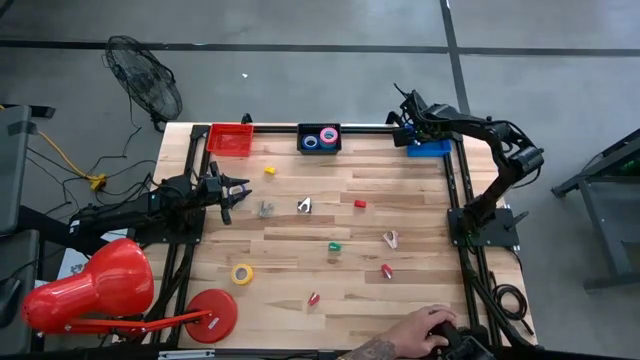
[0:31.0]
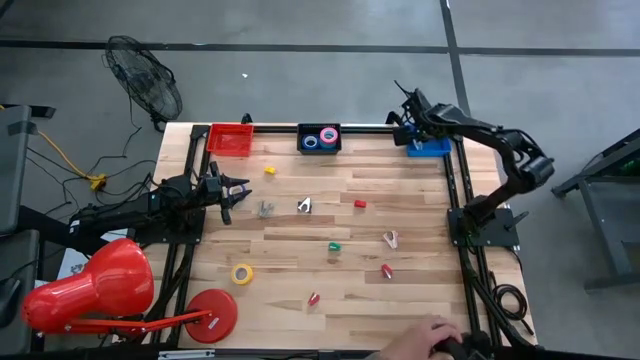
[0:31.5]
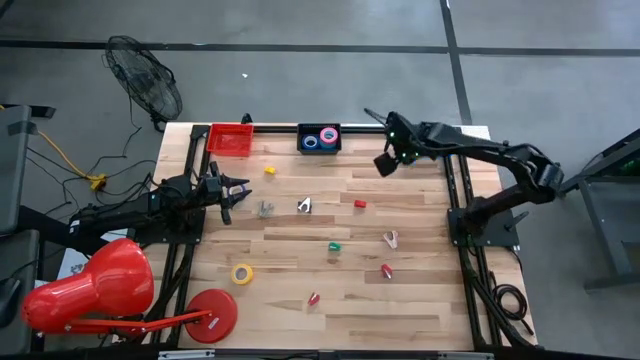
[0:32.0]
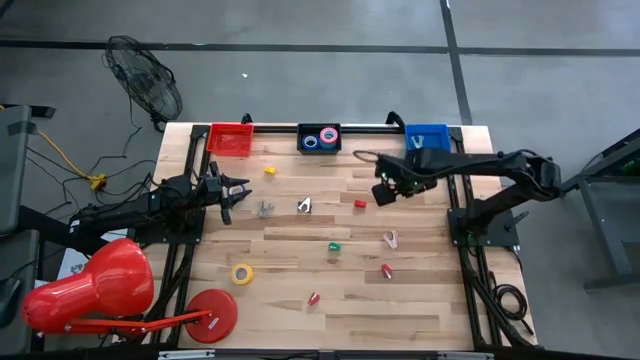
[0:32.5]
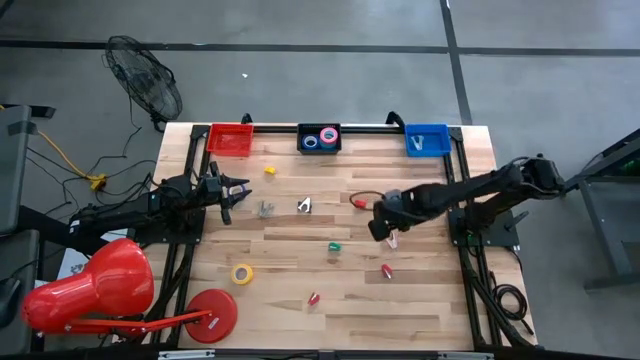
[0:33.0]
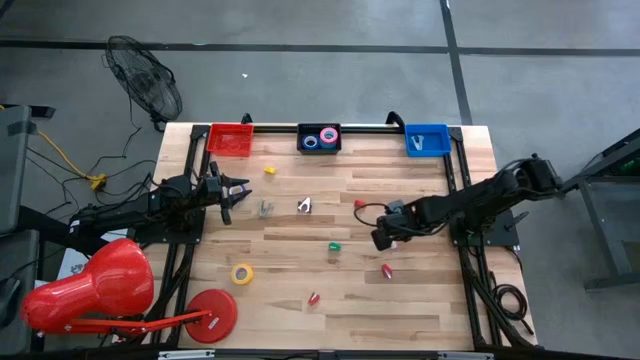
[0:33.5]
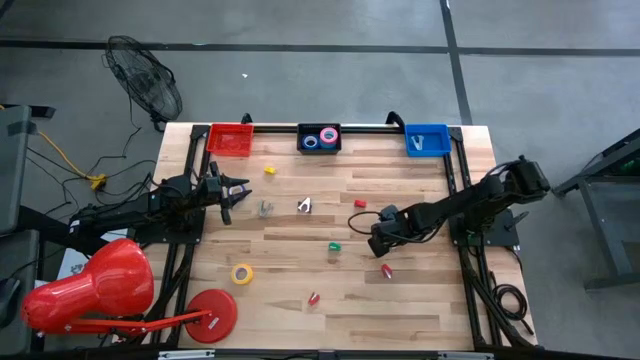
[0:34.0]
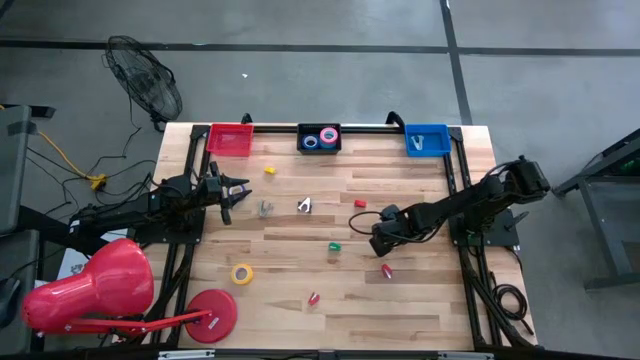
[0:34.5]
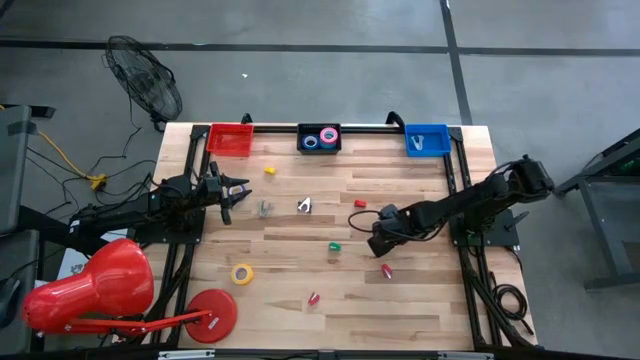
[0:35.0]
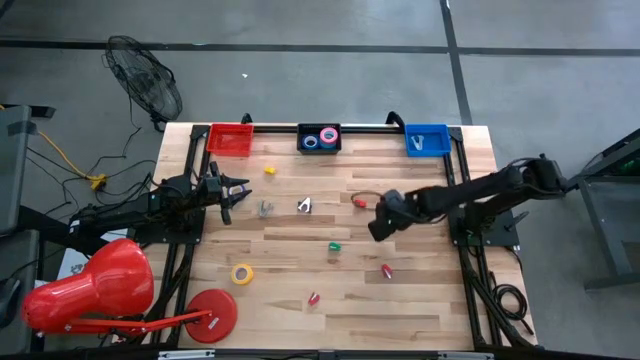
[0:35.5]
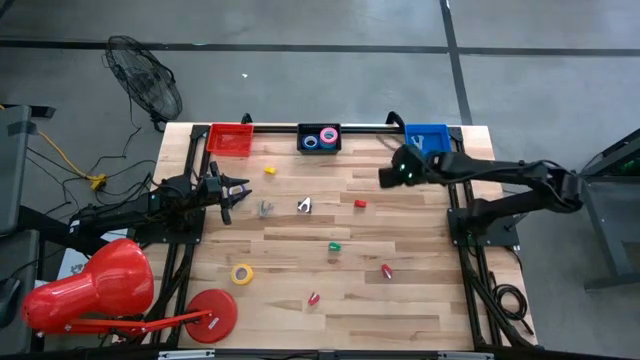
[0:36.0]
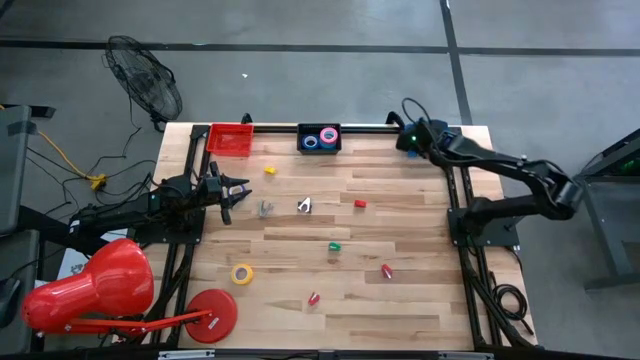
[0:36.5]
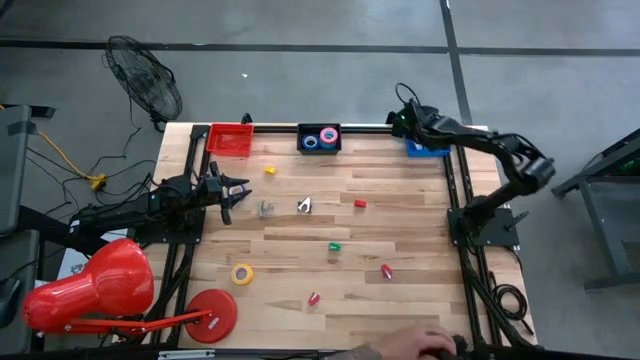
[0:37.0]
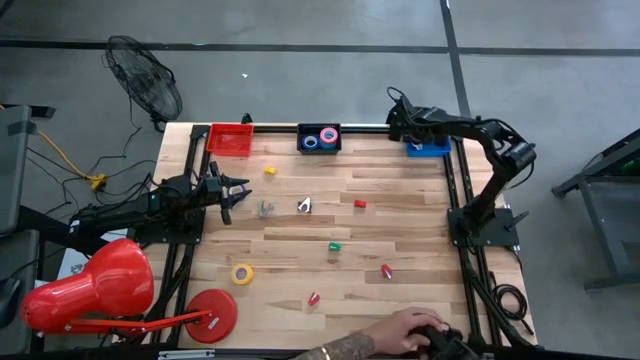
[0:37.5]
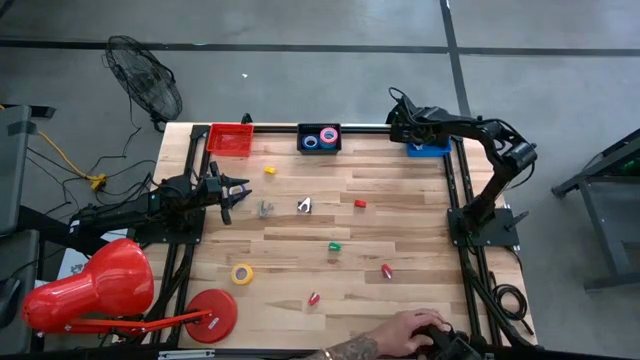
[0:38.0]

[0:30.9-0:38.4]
Task: Pick and place Stapler, Stapler remover, tape
Put the pink staple remover into the blue bin

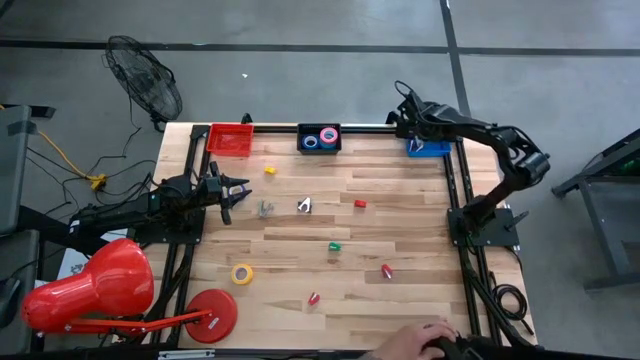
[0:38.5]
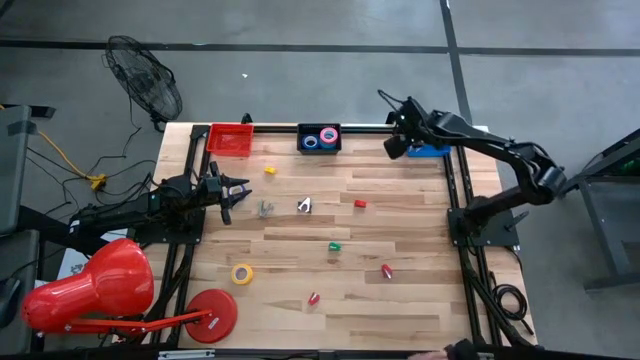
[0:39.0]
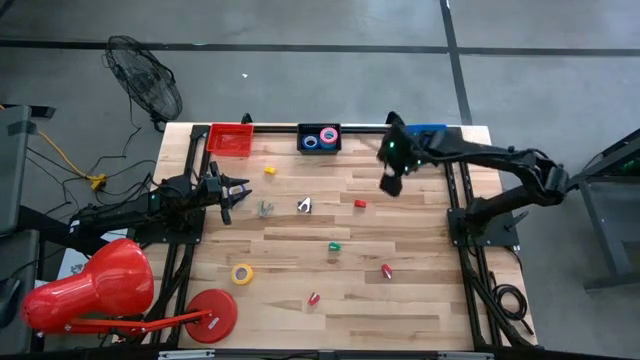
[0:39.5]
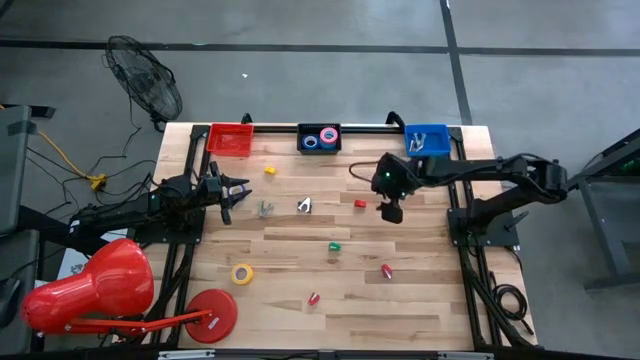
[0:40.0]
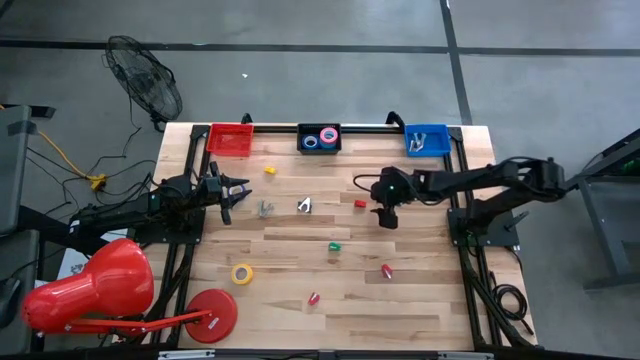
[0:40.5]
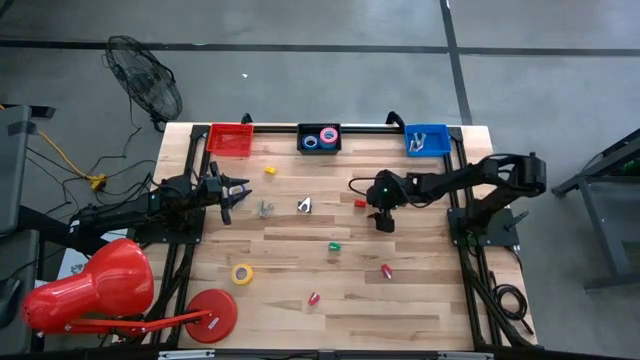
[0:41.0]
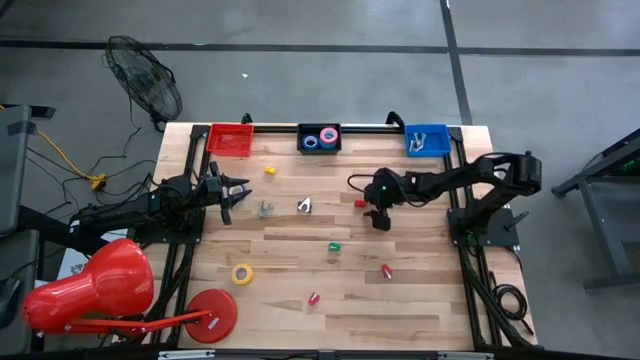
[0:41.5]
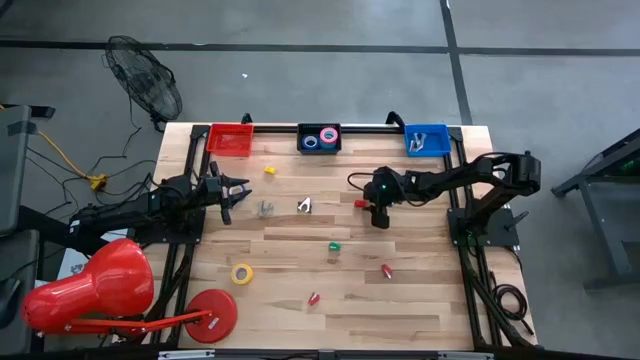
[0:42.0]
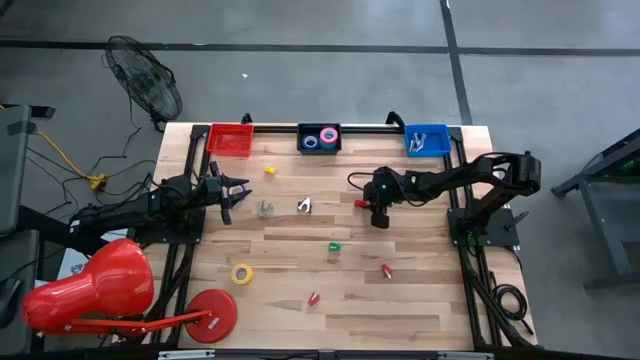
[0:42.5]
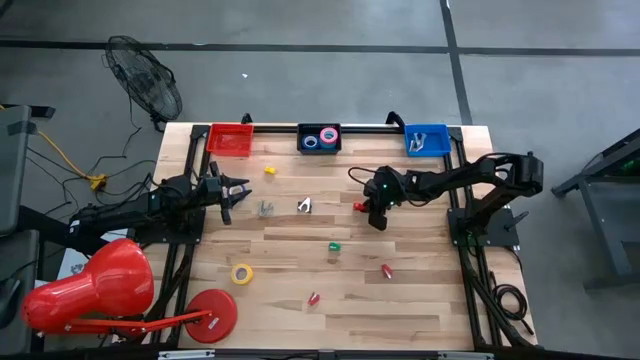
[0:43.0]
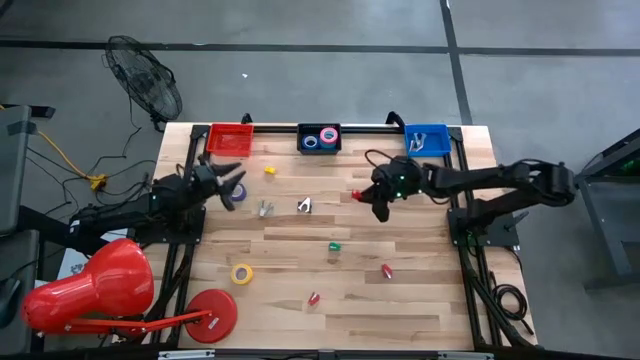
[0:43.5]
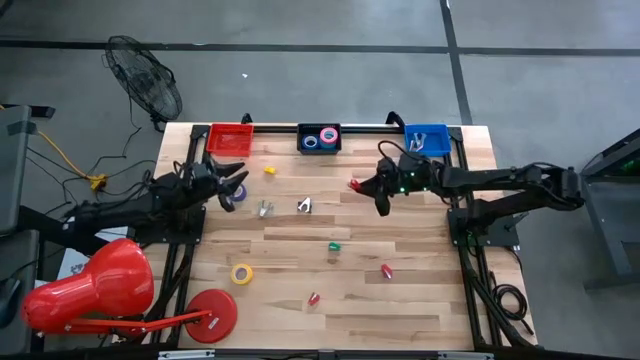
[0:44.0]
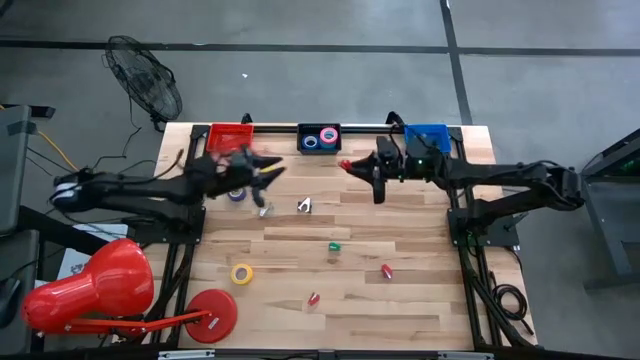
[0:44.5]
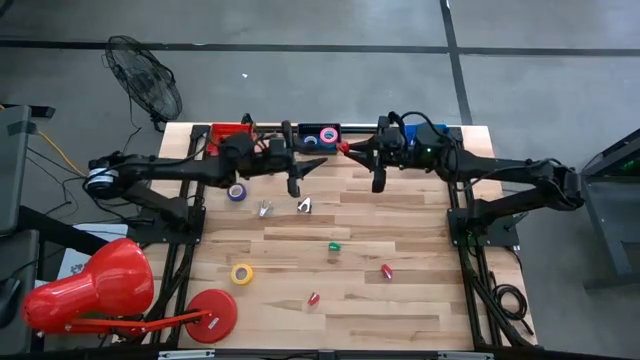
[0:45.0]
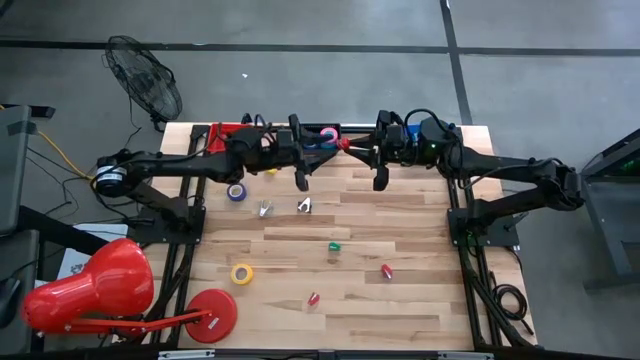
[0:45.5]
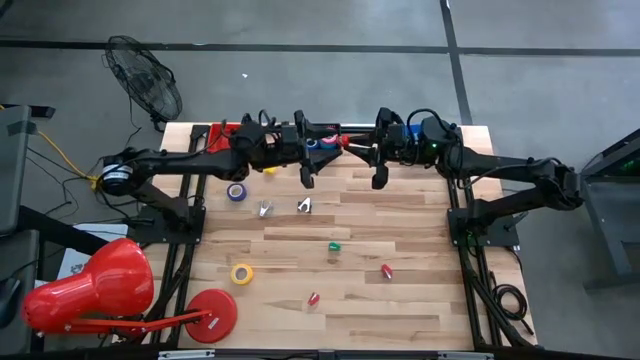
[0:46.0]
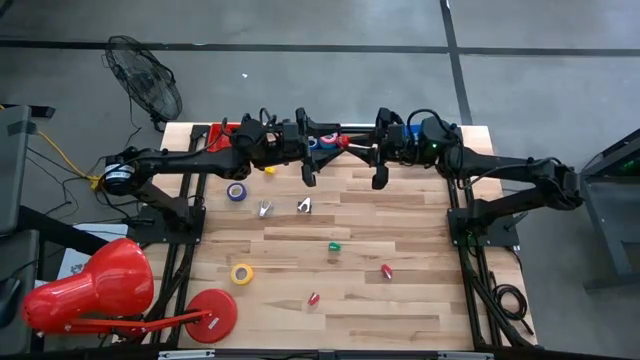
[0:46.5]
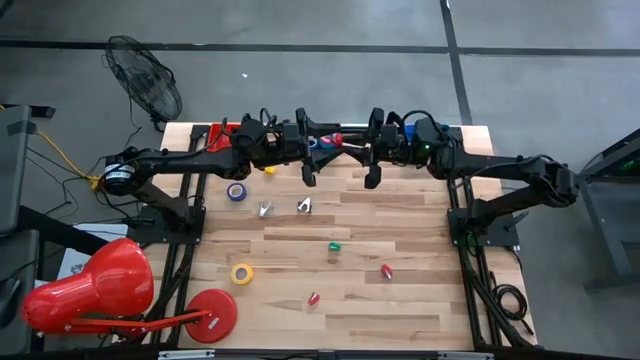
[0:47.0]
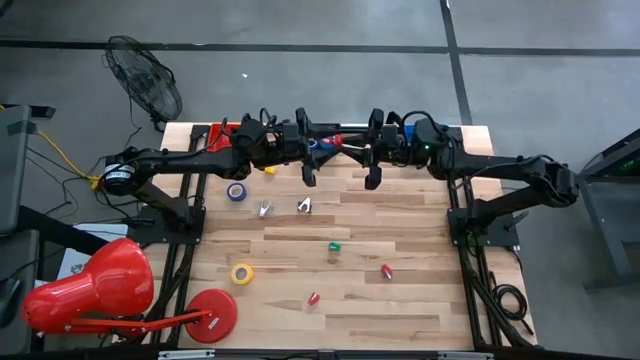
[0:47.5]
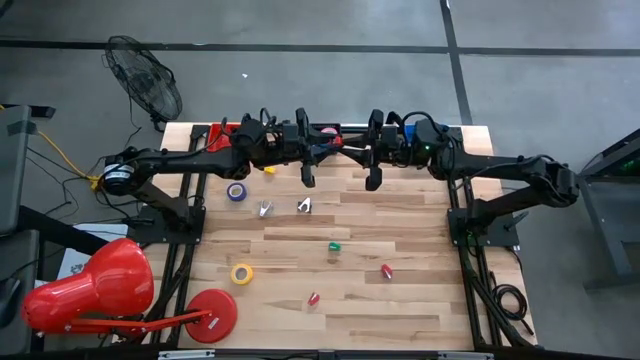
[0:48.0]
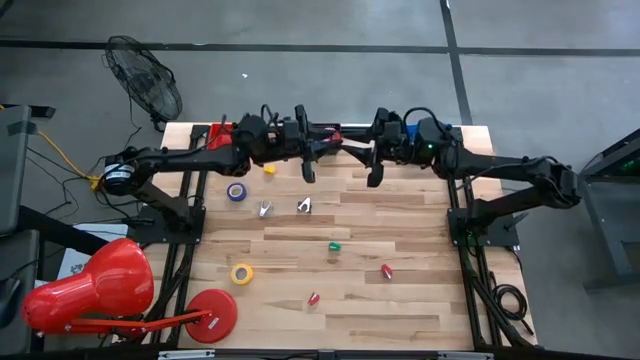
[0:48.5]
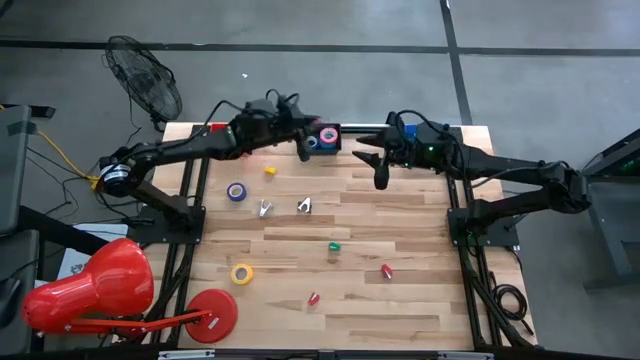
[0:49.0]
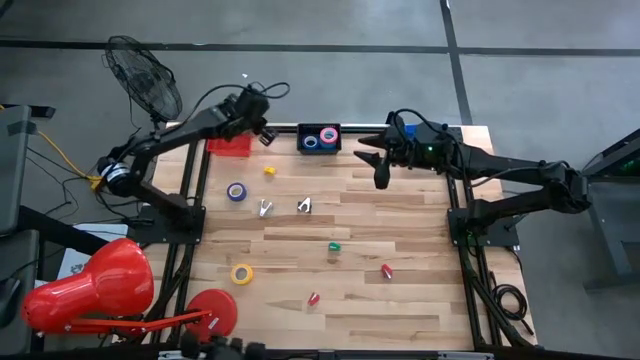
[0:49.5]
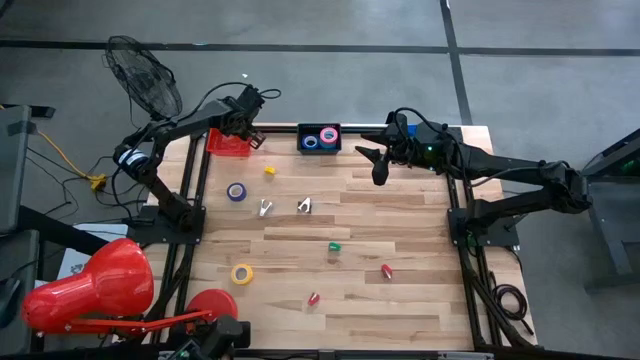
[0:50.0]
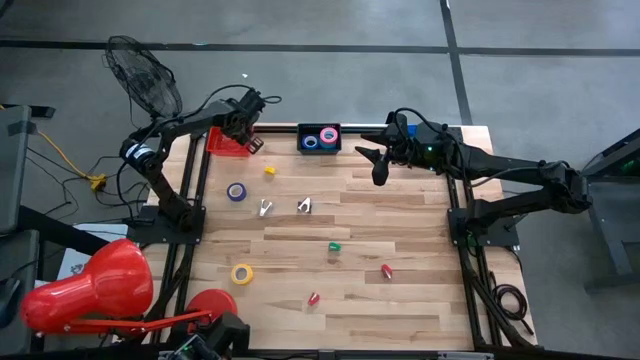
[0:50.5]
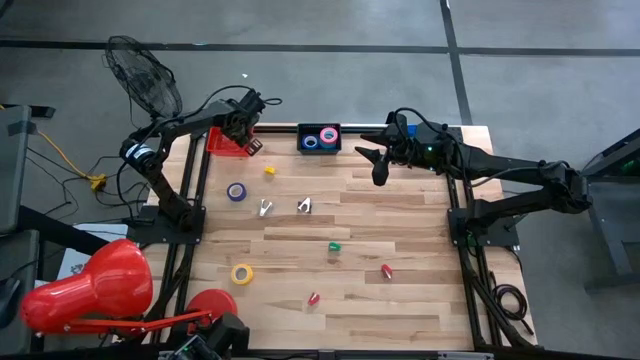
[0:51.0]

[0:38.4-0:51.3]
Put the top red stapler into the red bin

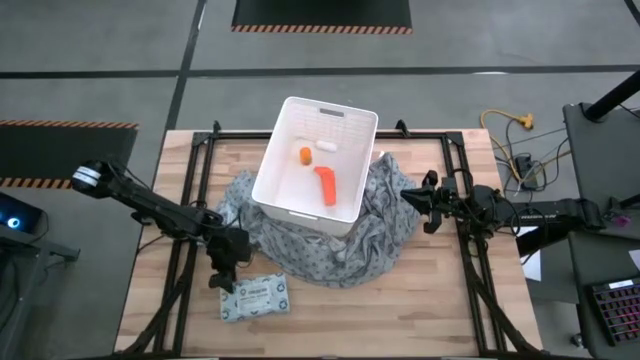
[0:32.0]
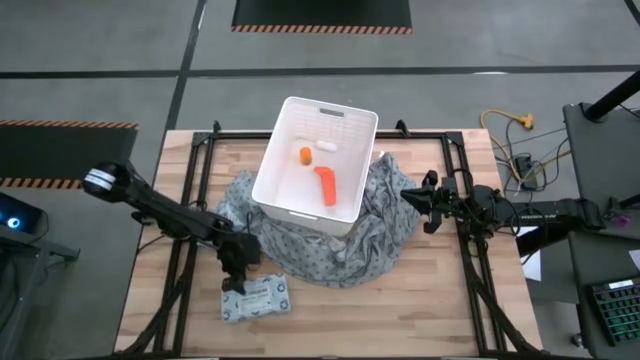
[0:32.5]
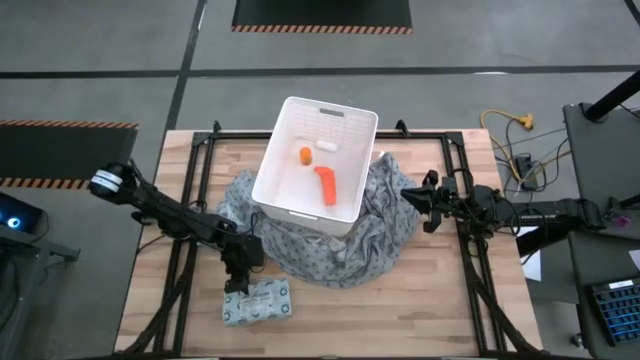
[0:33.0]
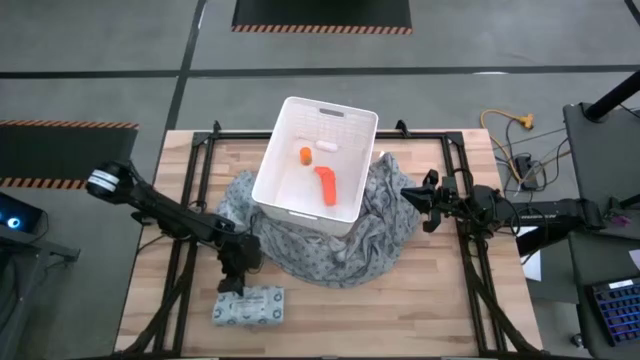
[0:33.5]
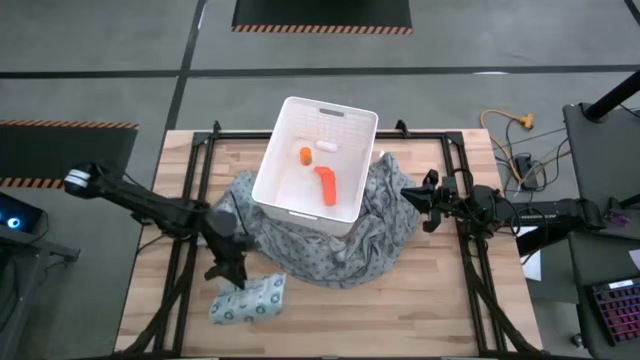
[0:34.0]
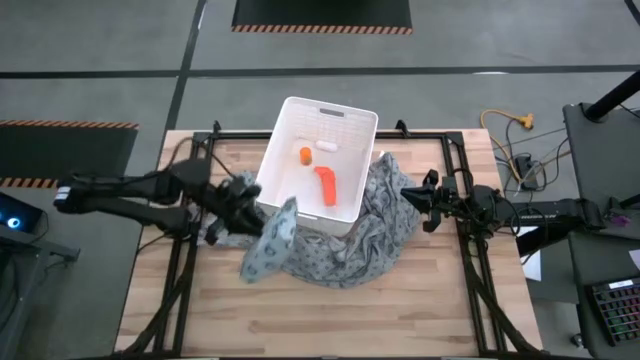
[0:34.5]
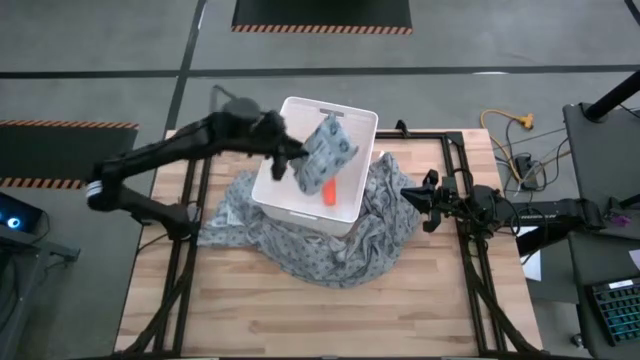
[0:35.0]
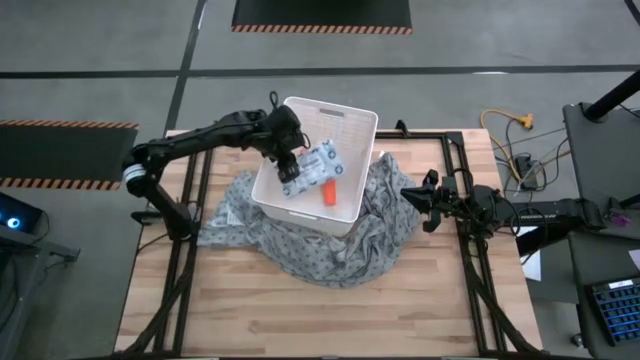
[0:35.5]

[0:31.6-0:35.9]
Task: Pick & place medical supplies in basket/bin
Put the mailer bag into the white basket
